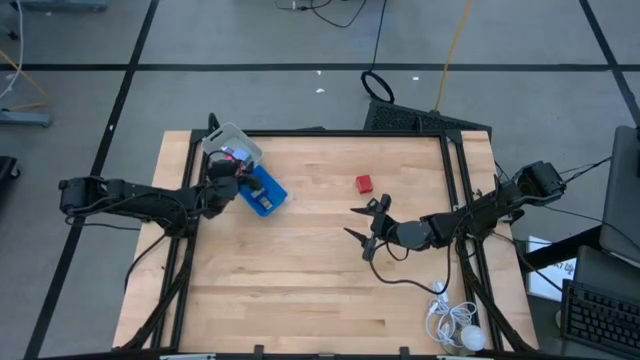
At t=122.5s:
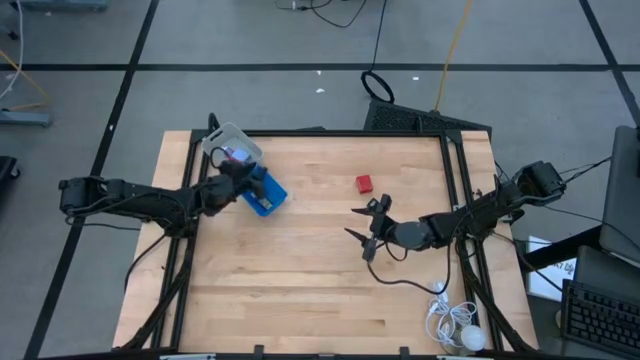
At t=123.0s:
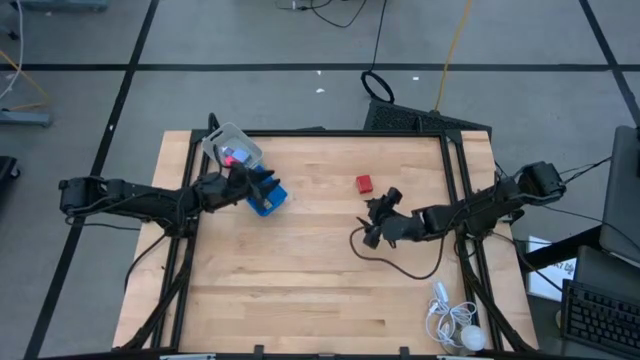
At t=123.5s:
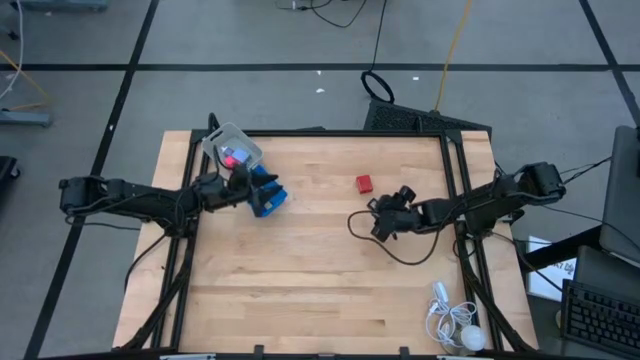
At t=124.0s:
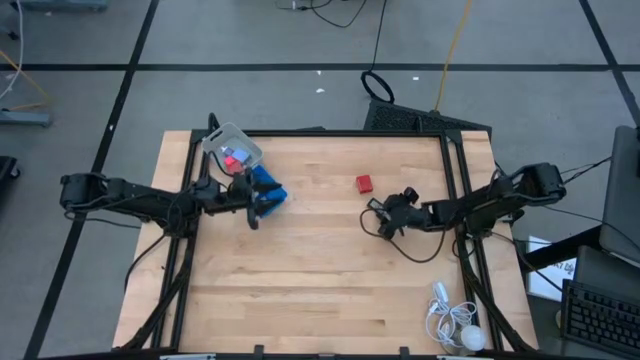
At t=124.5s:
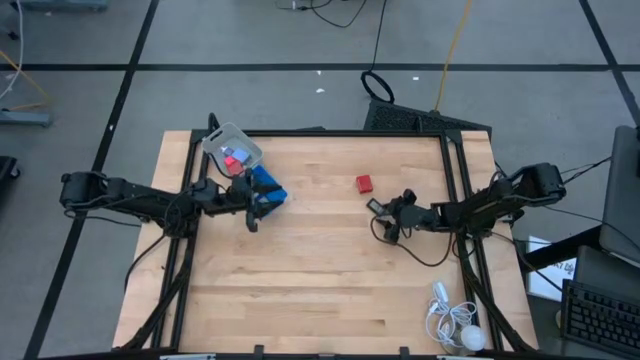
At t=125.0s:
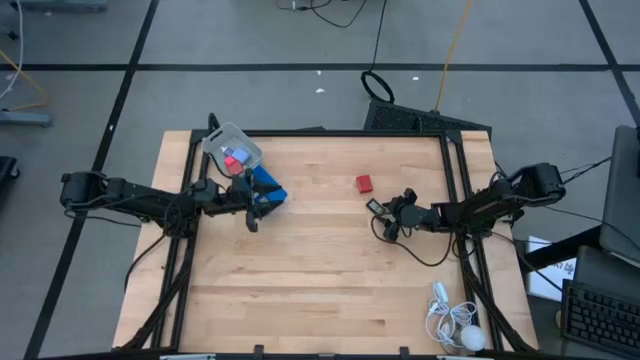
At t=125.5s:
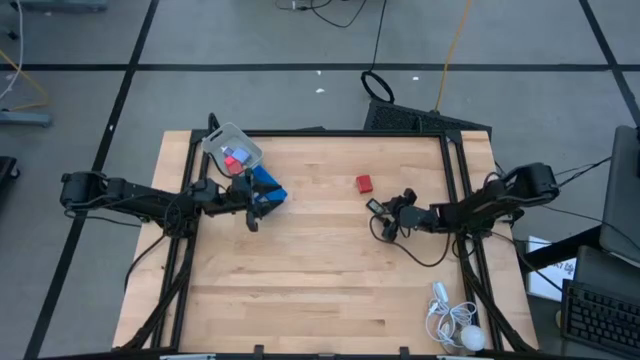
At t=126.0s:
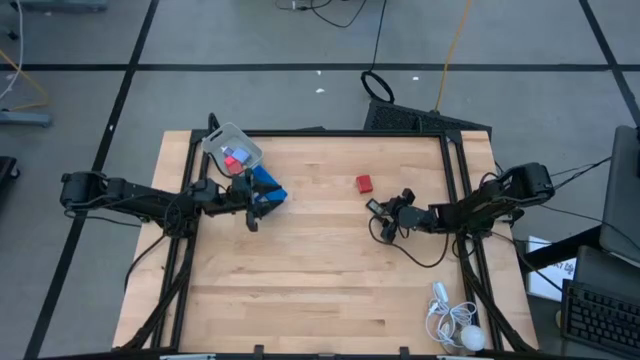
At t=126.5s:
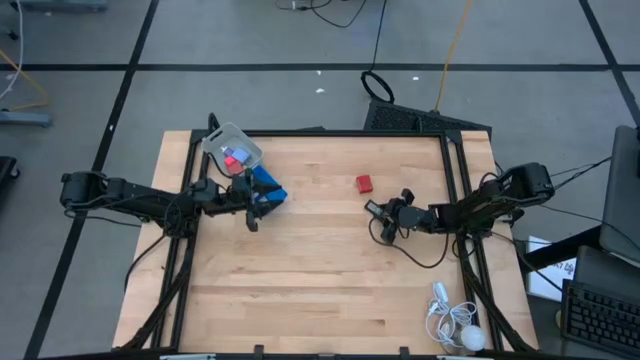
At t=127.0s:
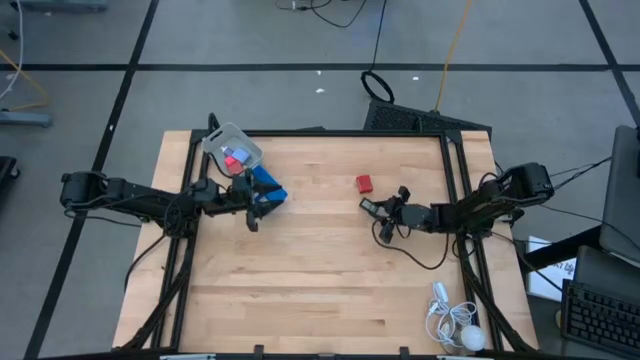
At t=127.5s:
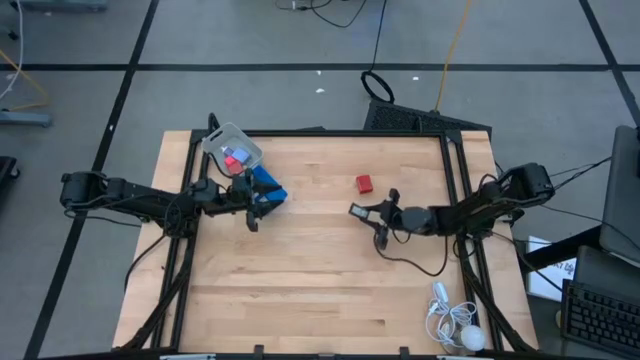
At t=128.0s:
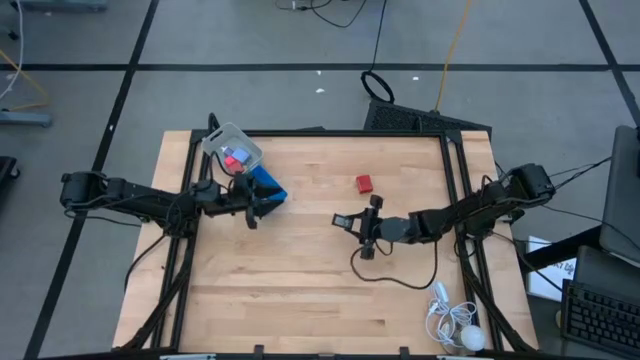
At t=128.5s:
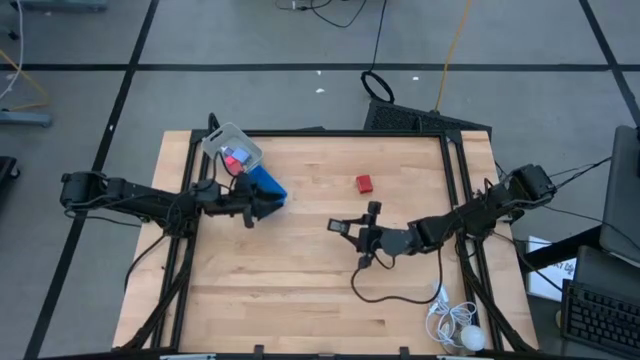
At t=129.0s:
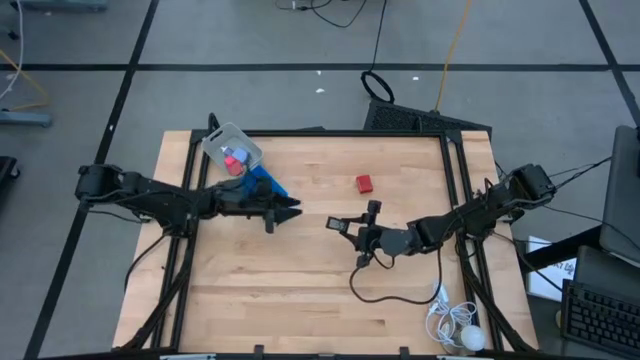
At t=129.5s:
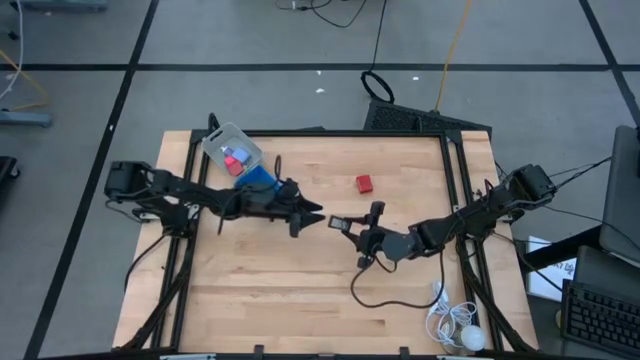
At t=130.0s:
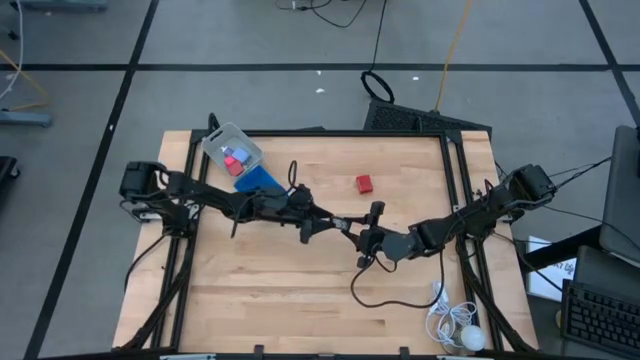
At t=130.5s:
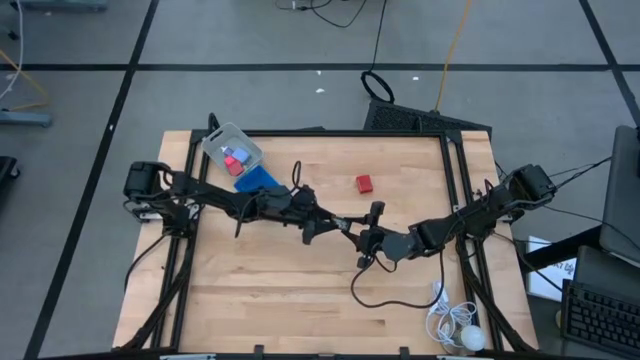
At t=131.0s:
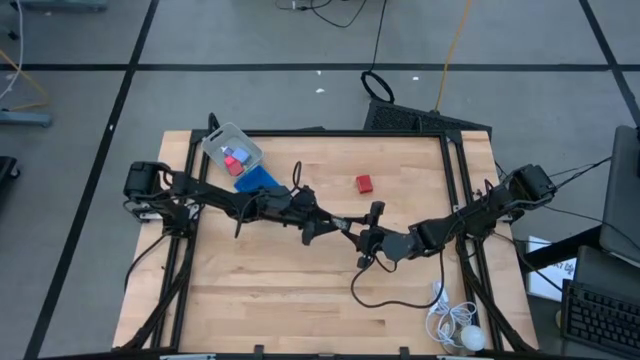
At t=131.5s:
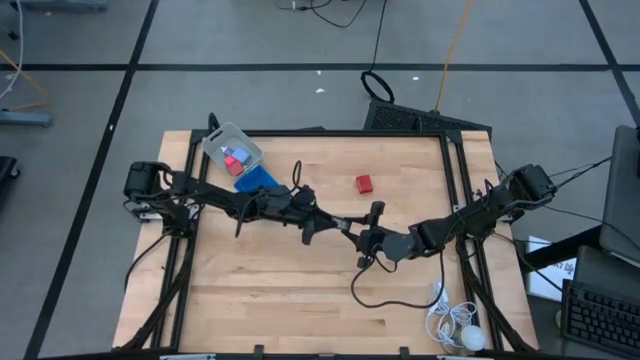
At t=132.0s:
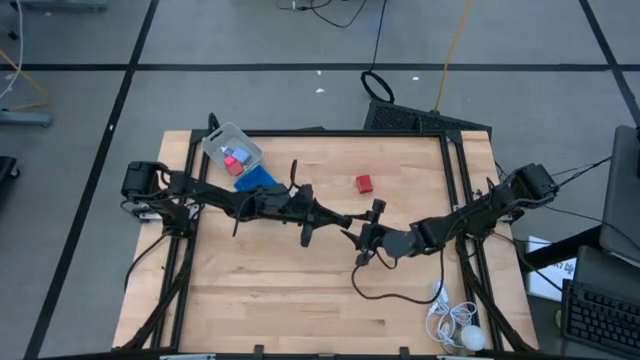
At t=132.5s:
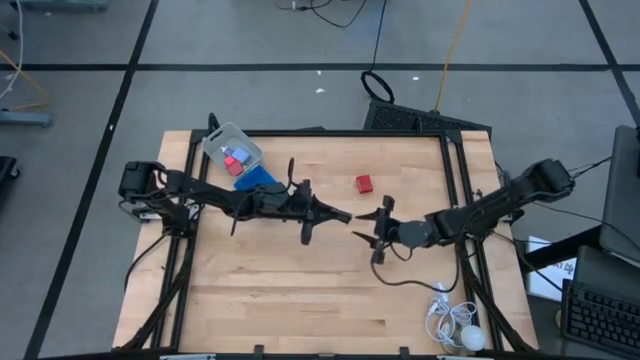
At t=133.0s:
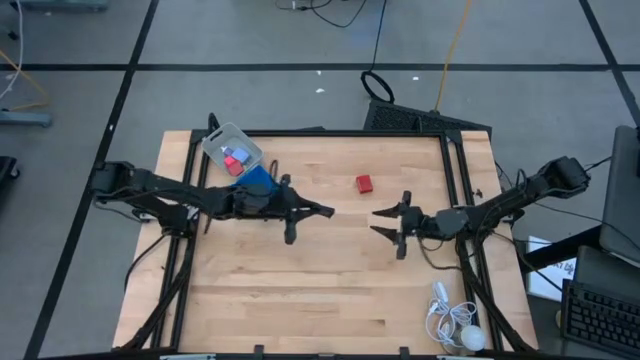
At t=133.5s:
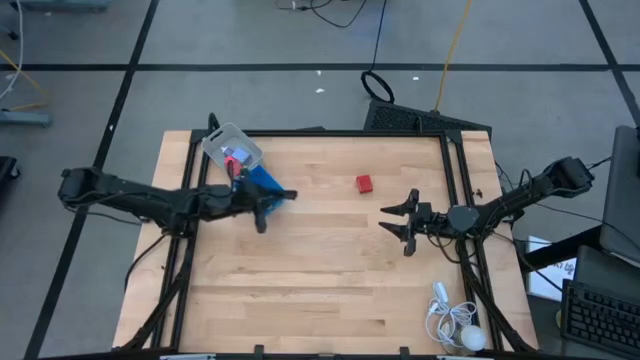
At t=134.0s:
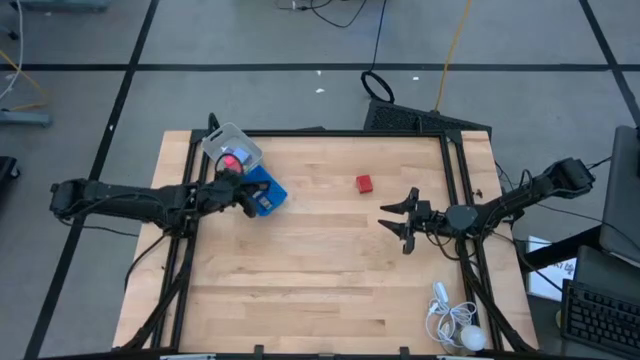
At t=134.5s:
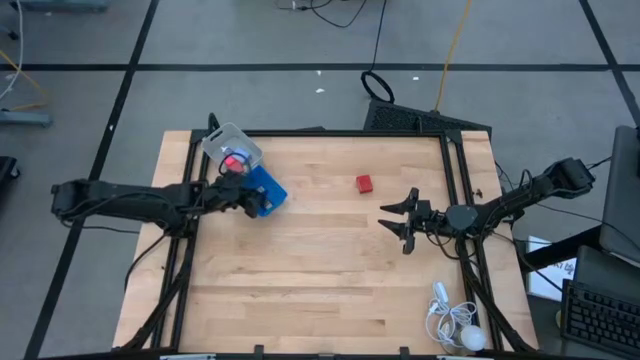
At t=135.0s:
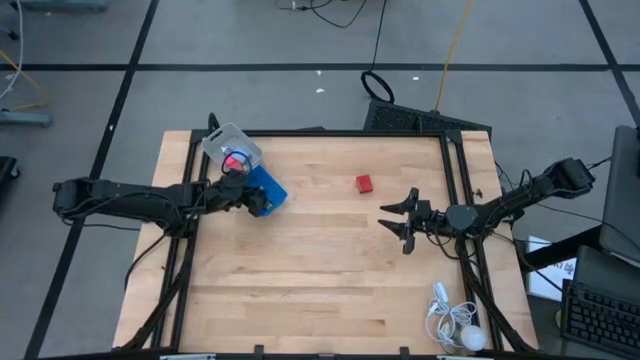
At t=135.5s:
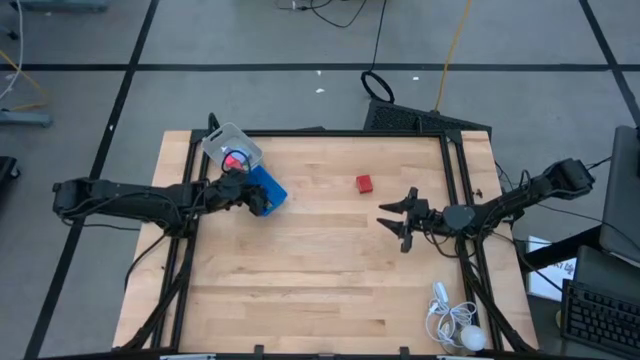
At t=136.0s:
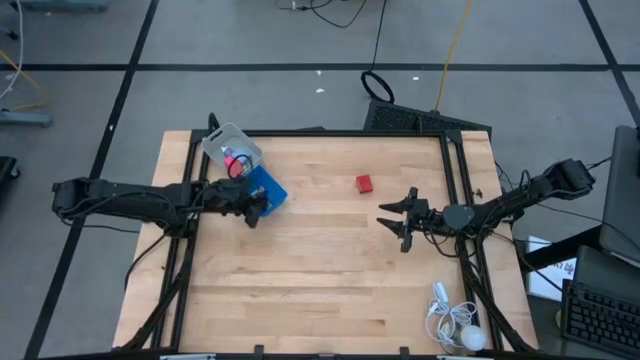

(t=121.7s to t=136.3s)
Task: Pick & Place Office items
Put the black digital timer into the blue bin
